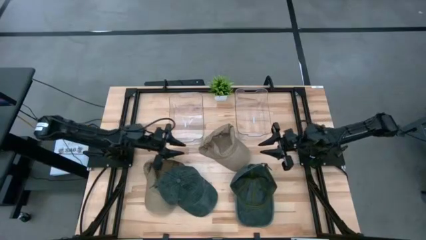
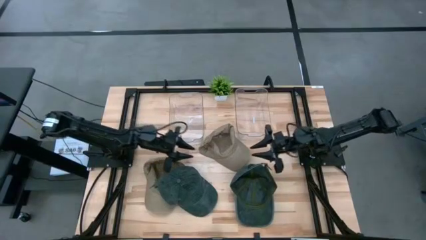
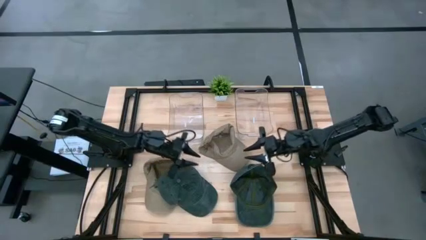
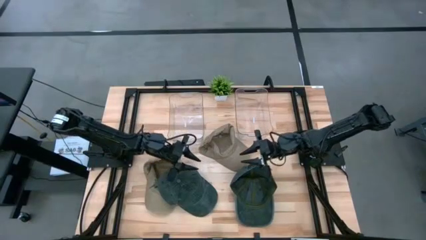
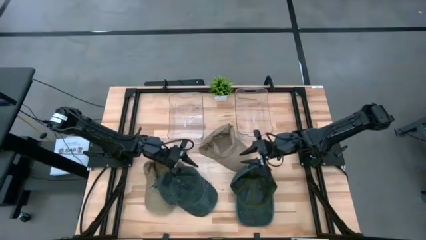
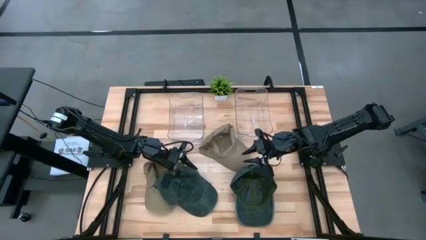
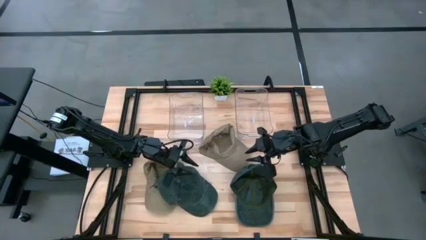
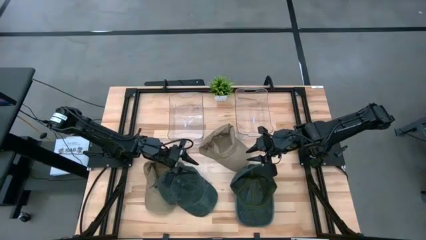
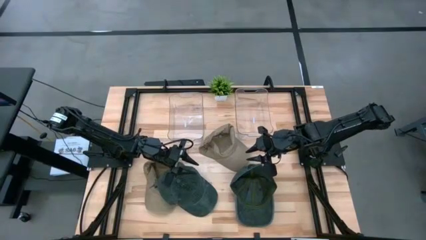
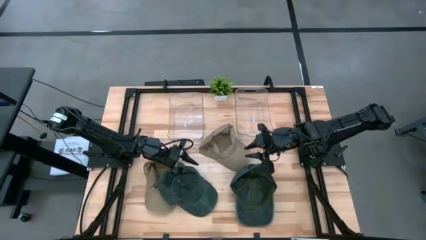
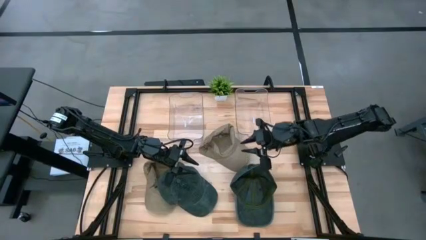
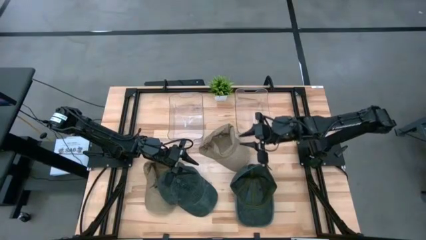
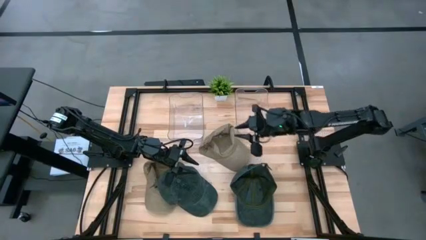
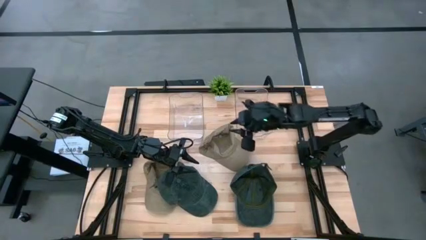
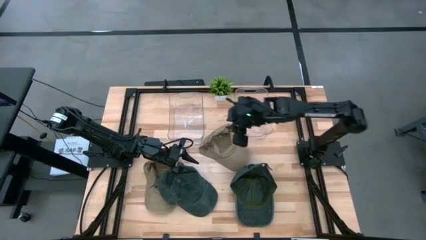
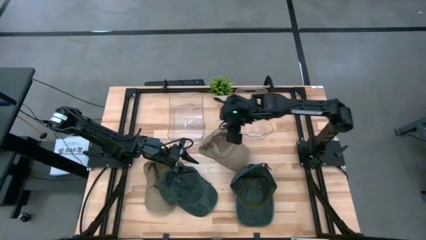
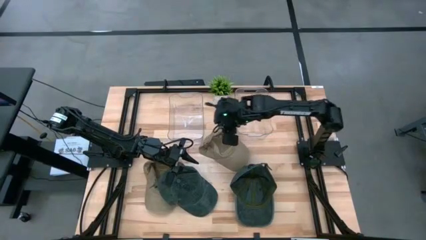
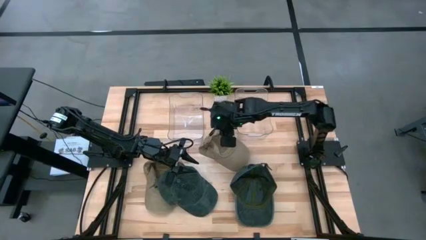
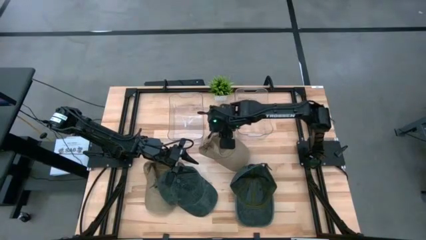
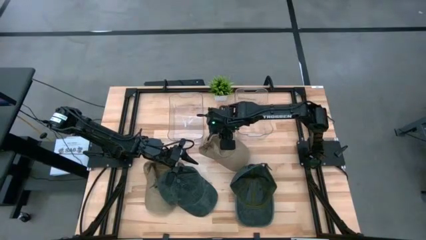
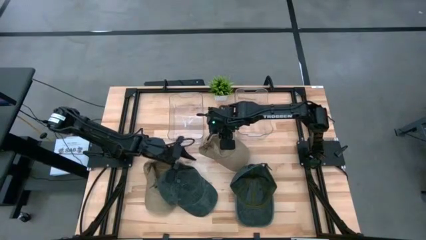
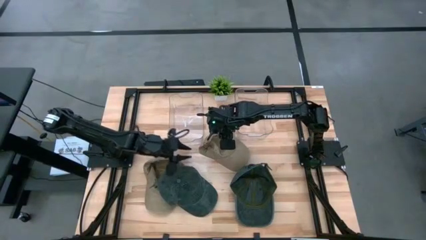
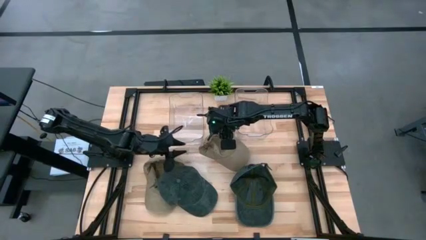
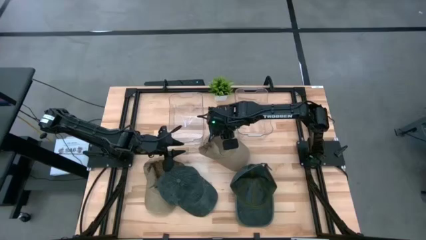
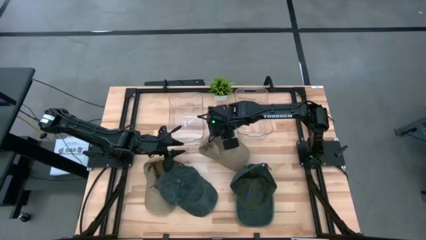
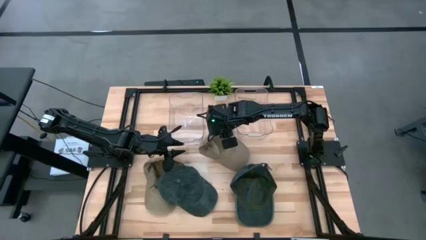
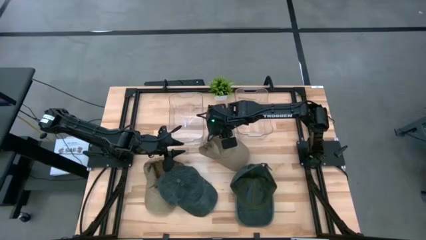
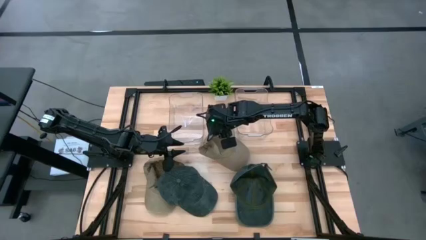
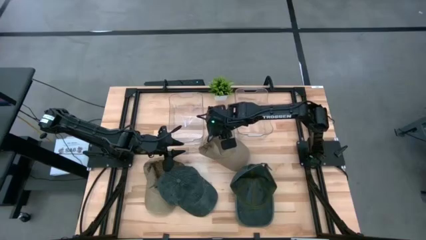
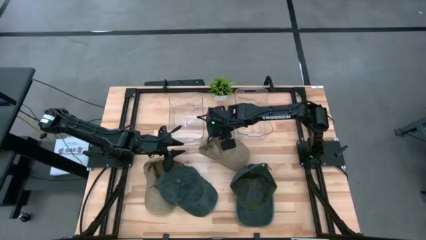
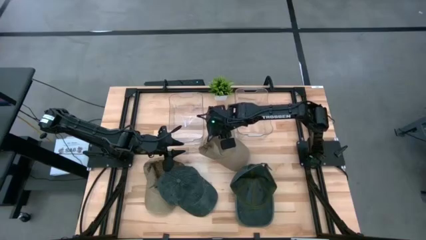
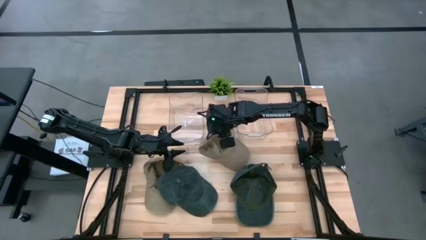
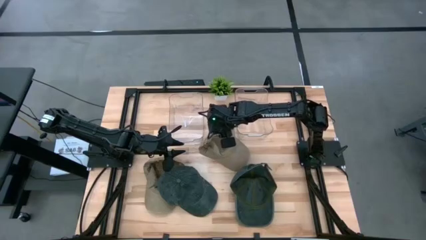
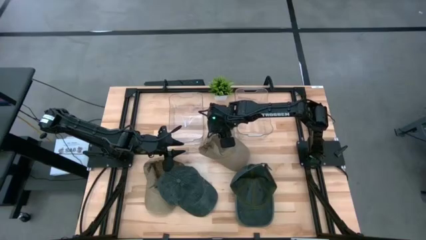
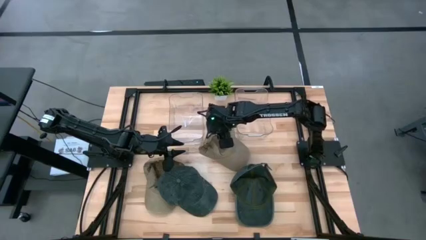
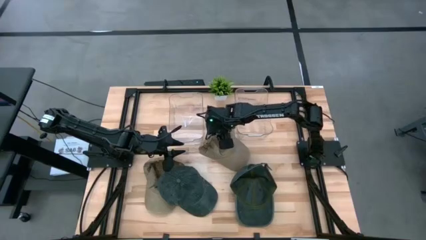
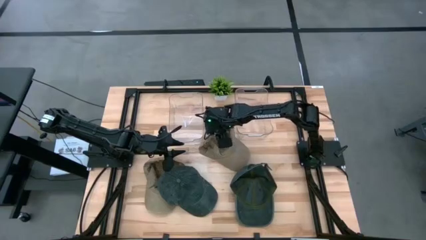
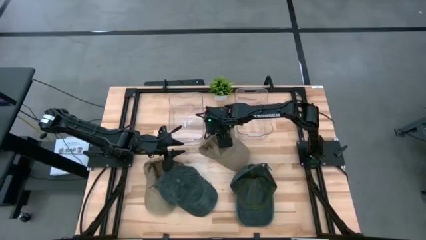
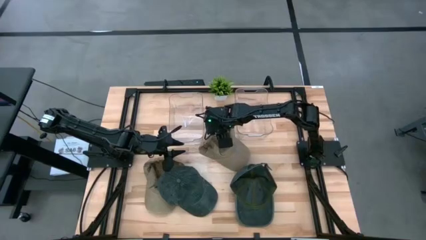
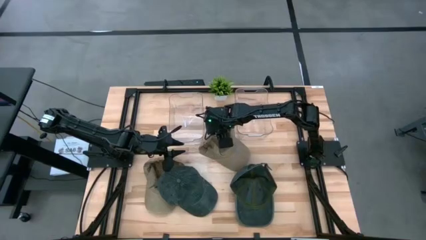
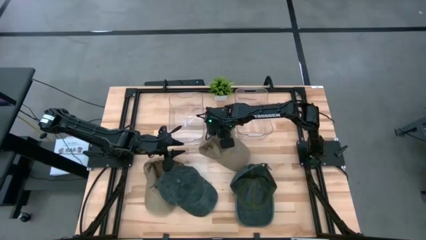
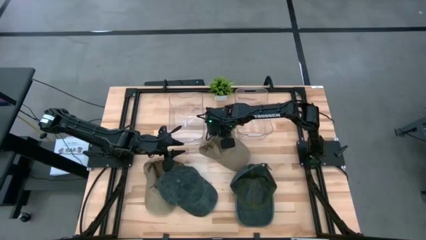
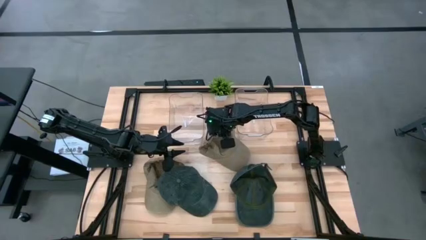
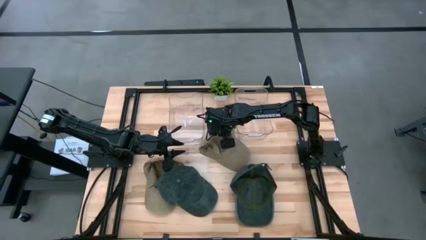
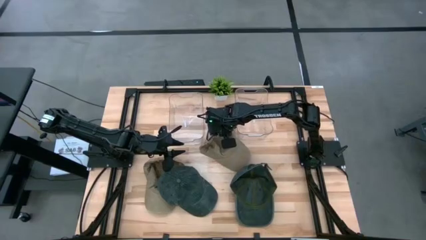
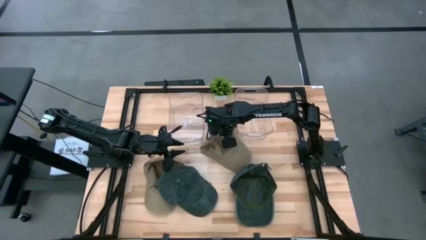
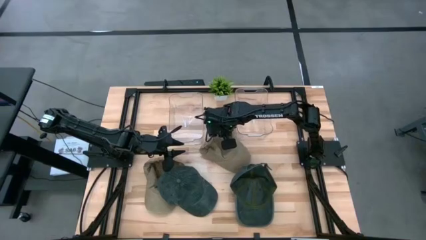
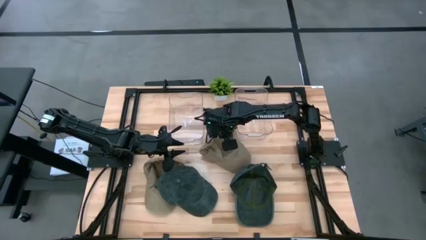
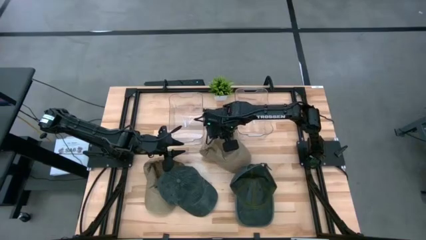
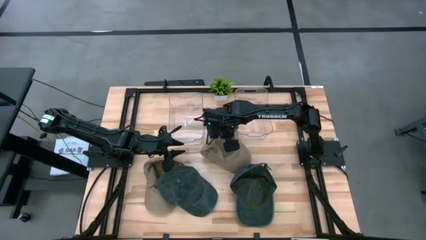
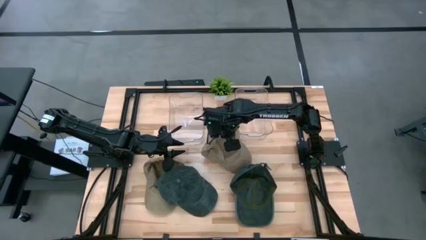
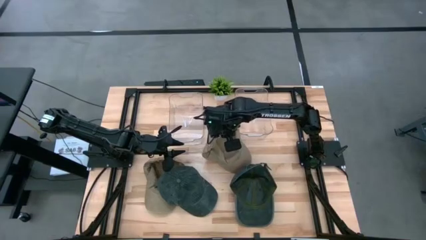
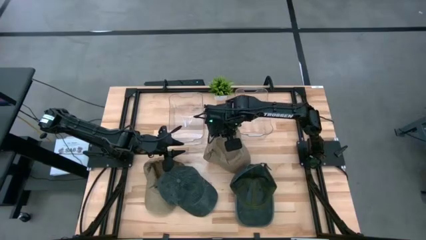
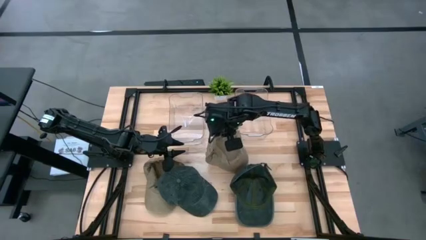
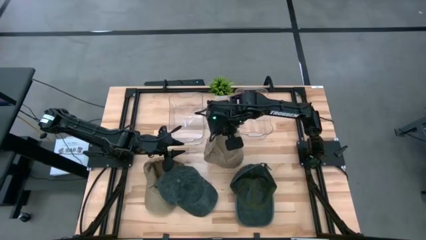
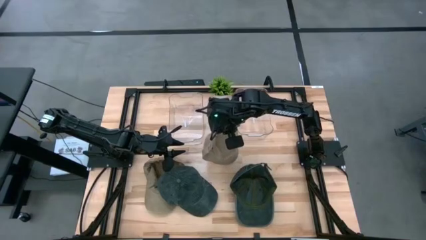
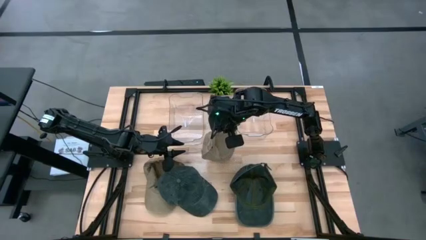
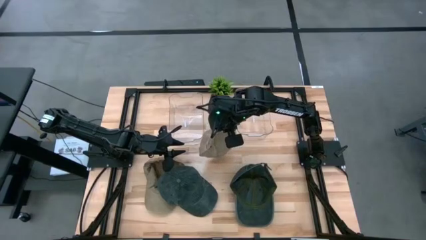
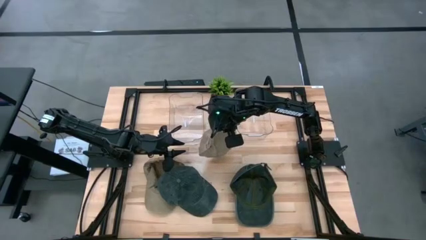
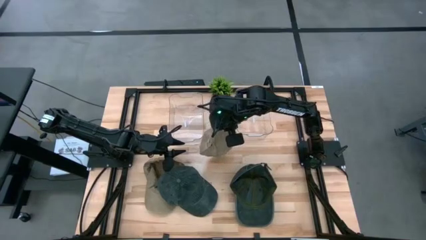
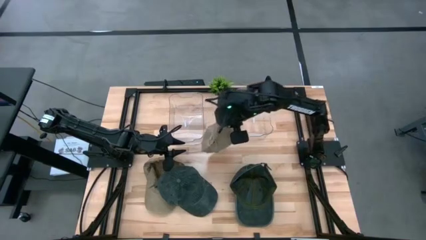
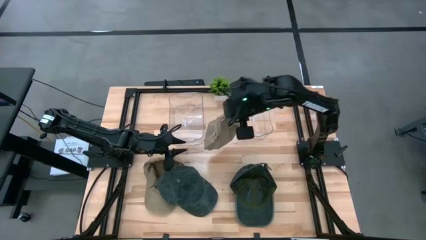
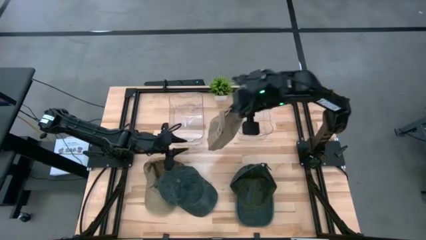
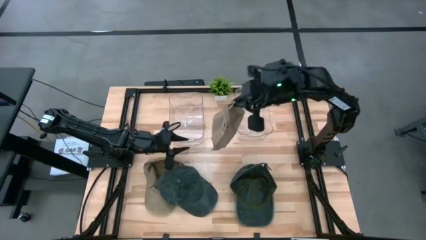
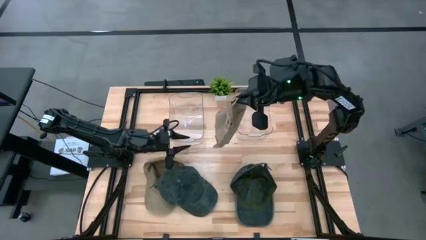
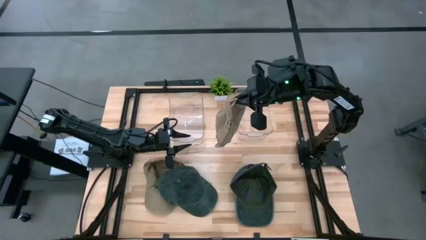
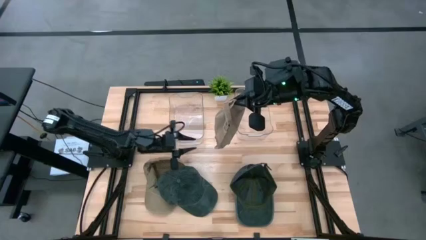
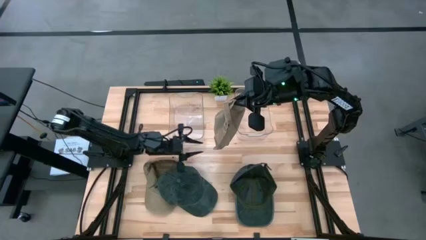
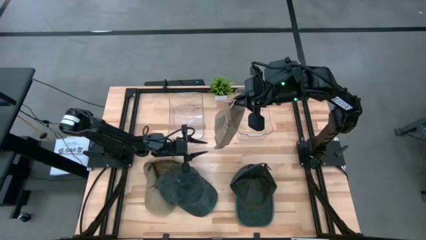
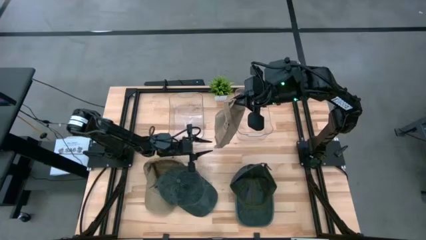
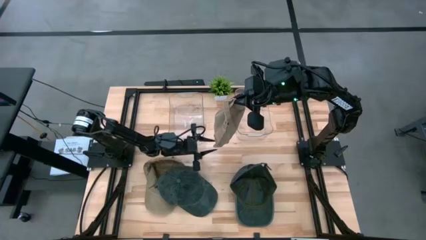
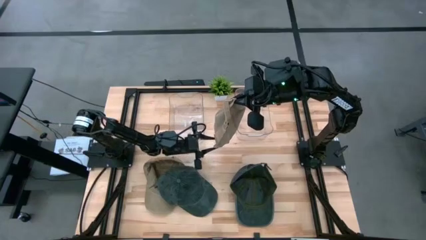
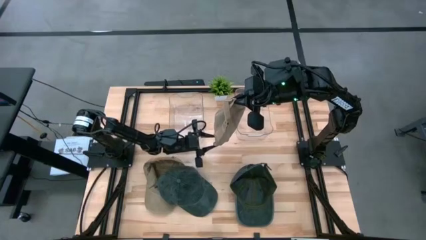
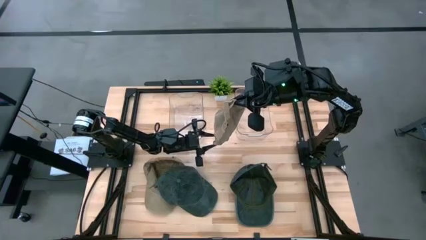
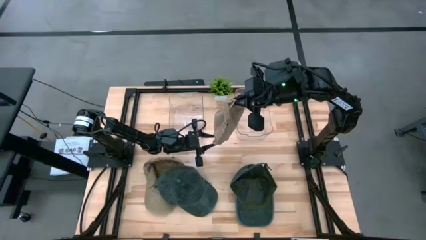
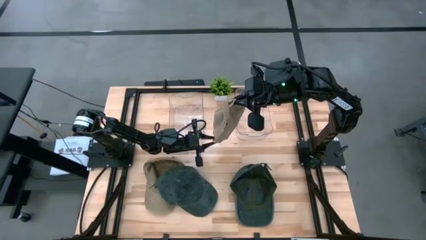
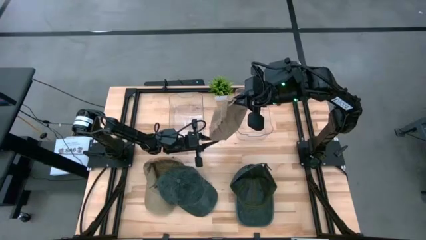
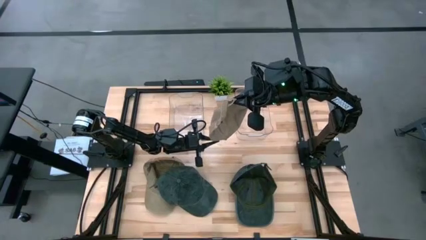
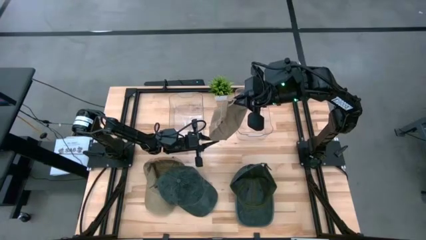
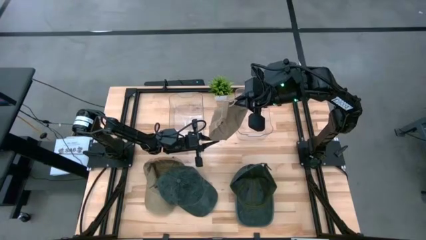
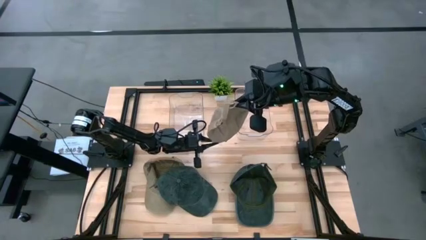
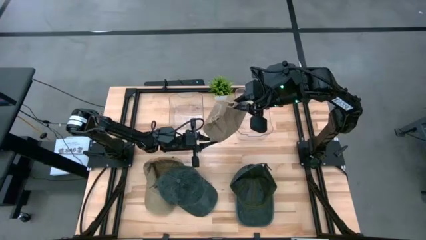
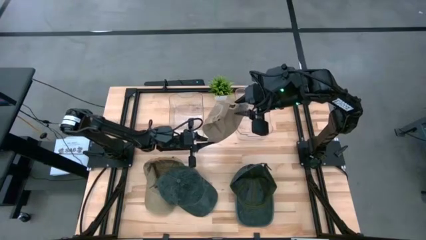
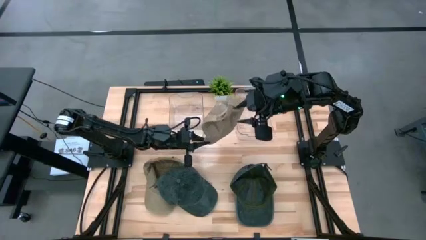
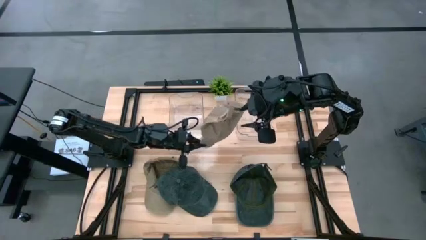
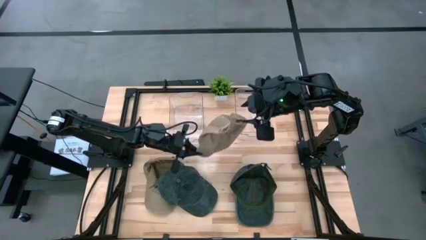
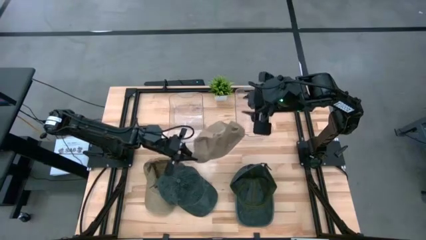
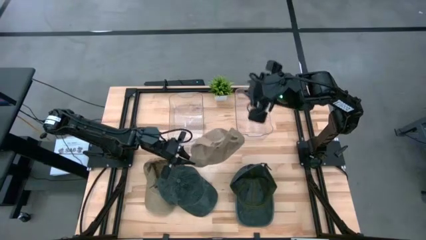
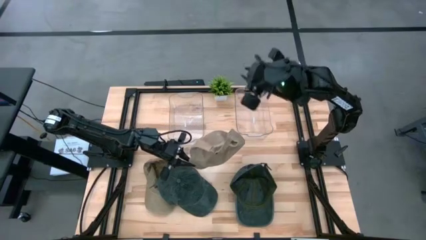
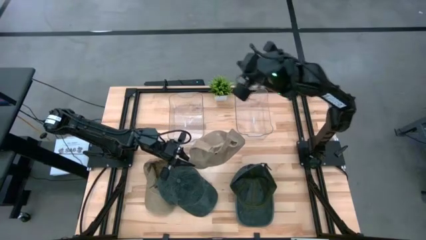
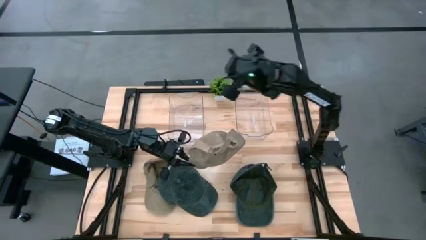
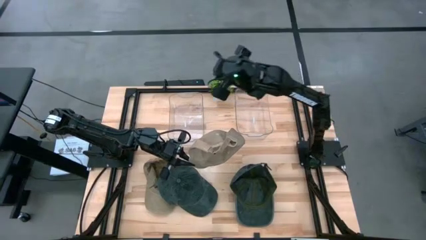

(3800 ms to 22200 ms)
Task: Pick & Place hat
Put the top brown cap into the right transparent bin
